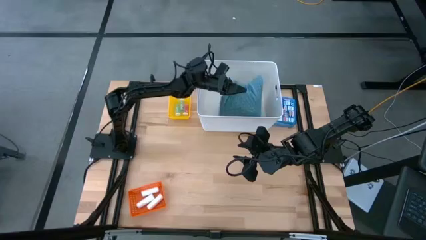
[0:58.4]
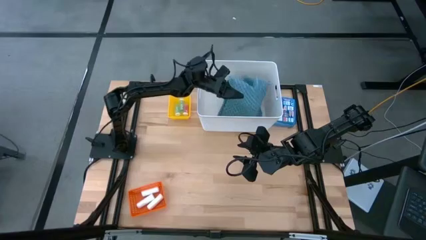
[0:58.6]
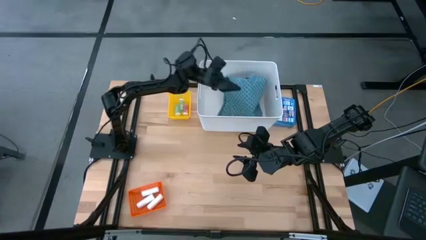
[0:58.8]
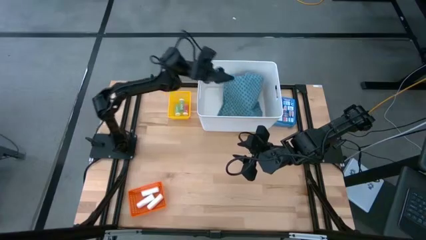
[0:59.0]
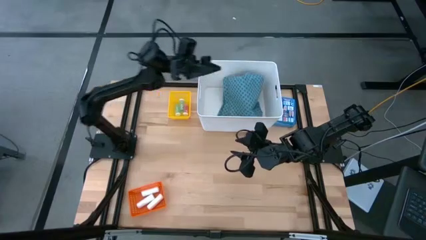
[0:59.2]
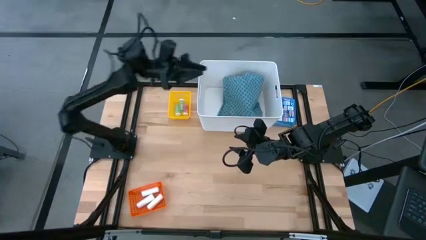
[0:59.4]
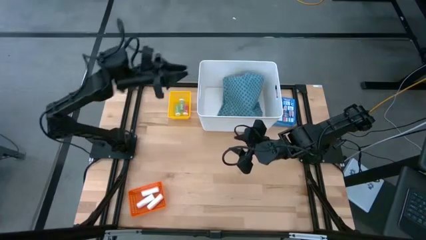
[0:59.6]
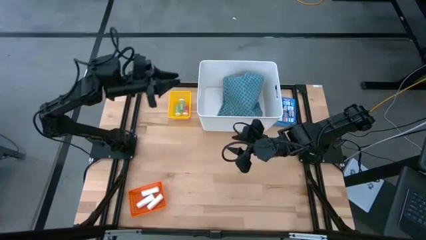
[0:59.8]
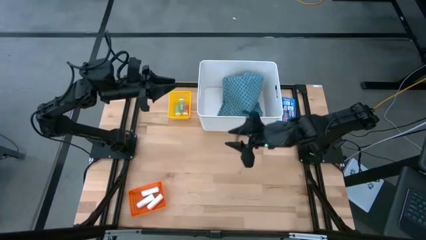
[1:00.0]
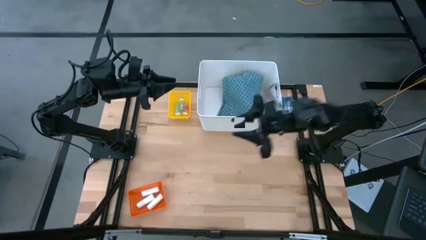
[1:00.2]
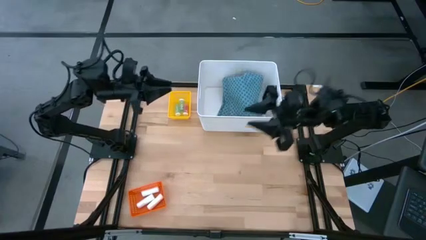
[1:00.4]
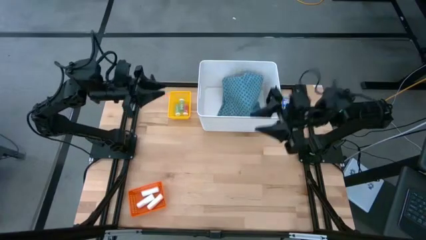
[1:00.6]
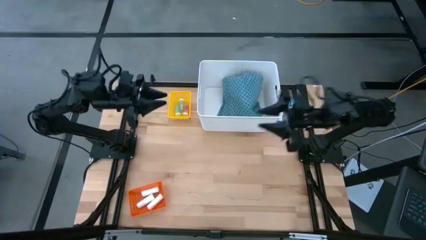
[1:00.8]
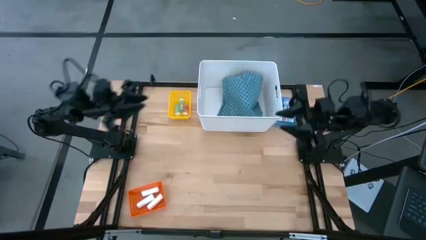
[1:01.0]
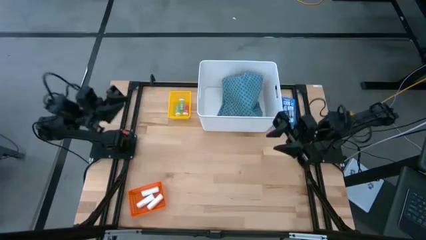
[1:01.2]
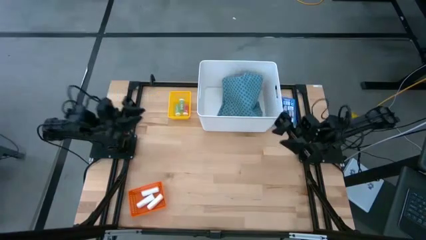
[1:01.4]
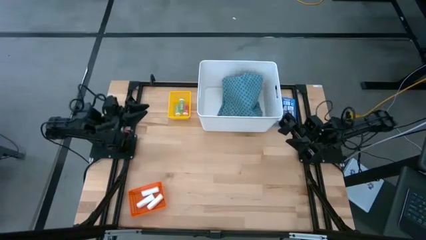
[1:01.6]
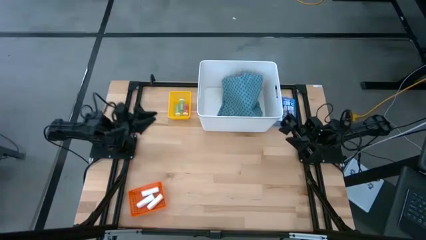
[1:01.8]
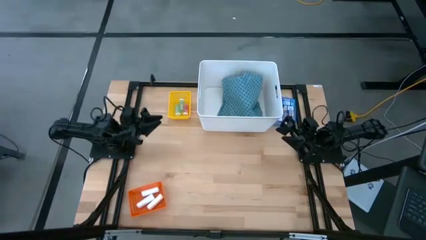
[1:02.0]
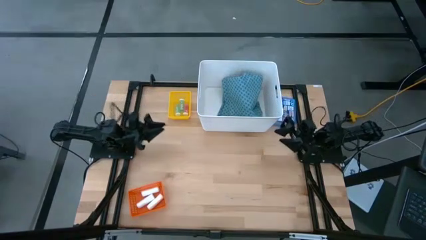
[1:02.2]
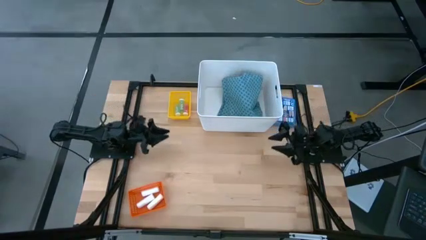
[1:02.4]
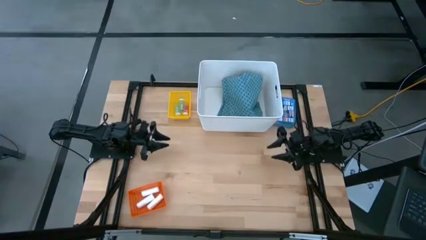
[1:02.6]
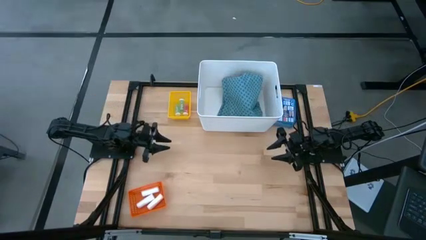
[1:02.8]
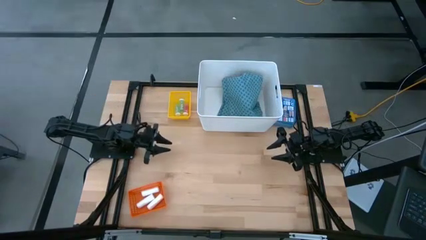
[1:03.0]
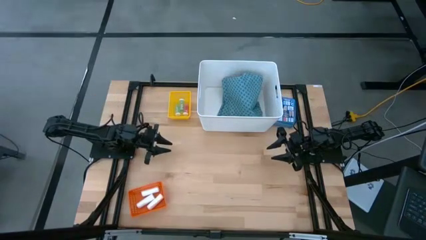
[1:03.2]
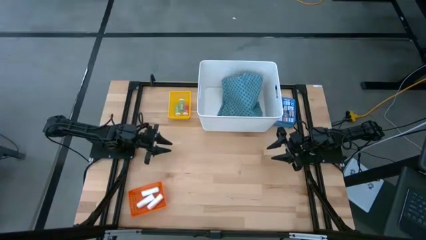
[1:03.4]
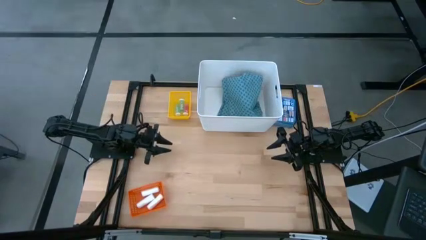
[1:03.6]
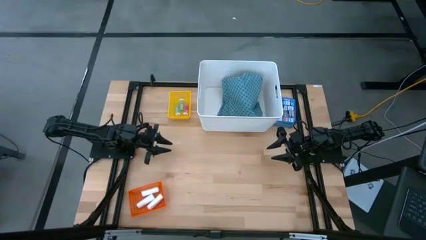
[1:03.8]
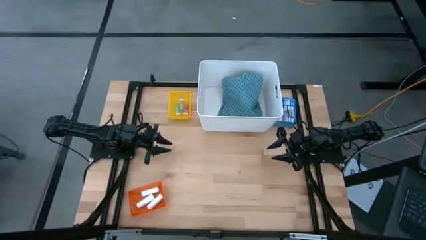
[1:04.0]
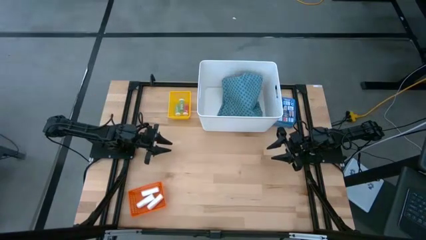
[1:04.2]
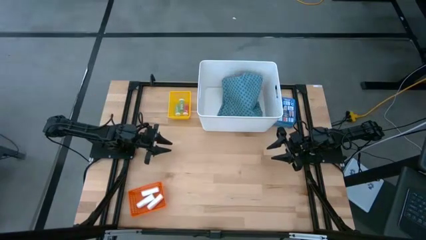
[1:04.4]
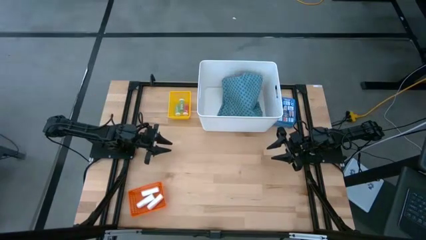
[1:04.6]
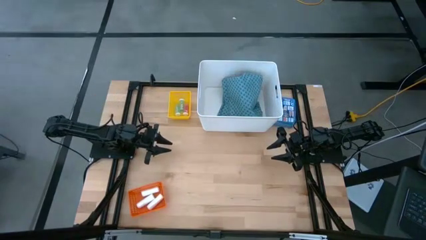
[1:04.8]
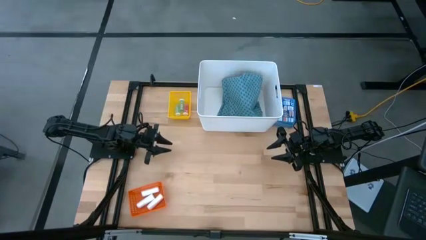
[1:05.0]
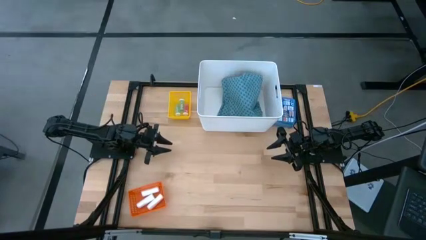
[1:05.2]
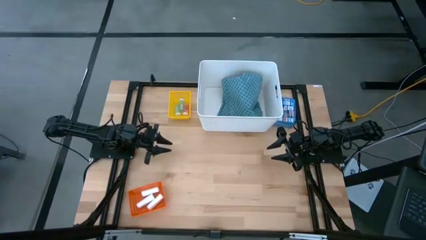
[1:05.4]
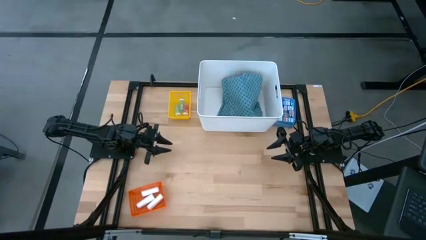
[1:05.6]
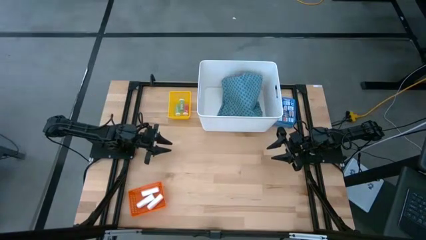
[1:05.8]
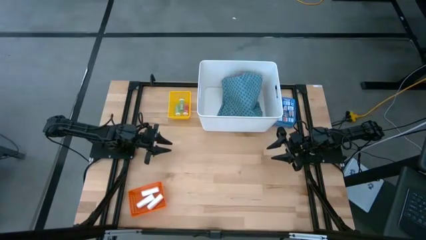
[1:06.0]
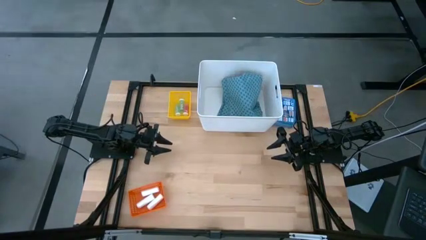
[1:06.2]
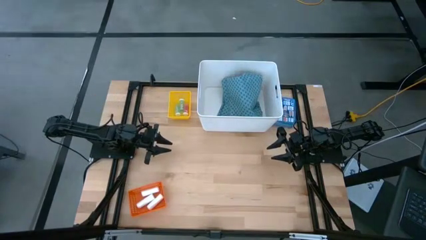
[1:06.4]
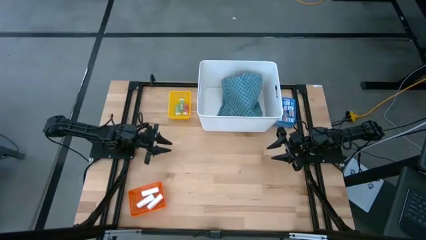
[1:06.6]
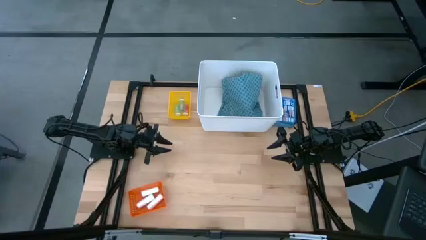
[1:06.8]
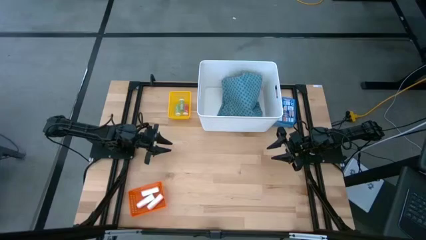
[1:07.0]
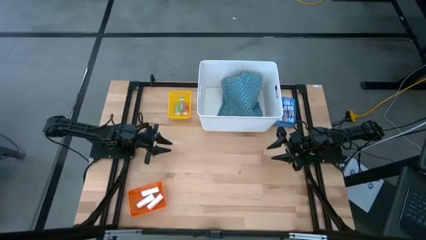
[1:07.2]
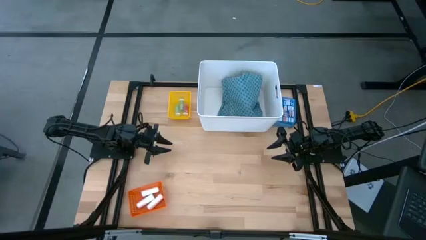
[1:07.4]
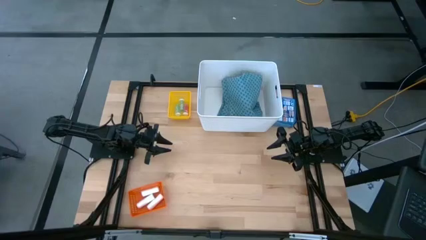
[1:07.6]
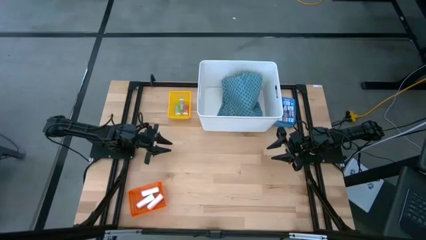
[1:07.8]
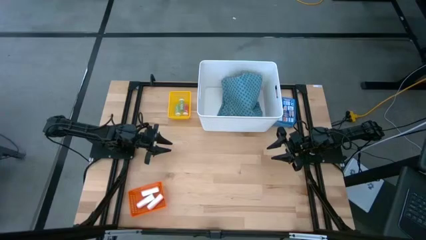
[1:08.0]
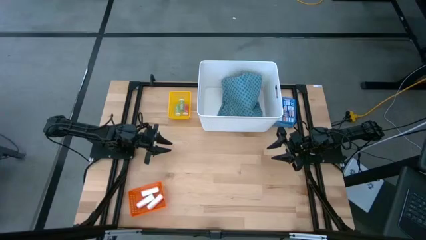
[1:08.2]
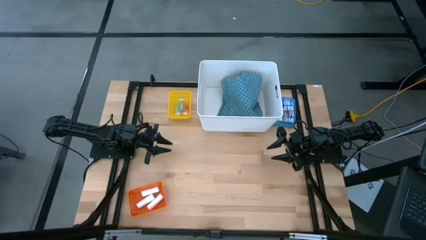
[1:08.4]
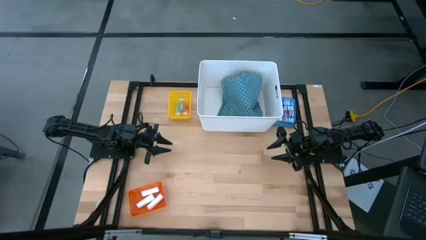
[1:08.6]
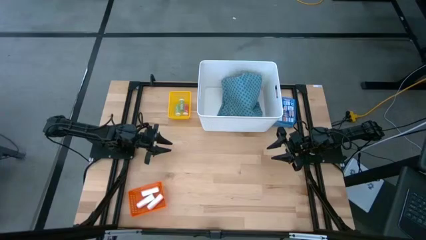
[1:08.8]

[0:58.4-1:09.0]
Task: Pick & place medical supplies in basket/bin
Return to Home Position

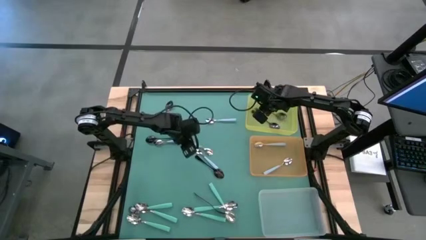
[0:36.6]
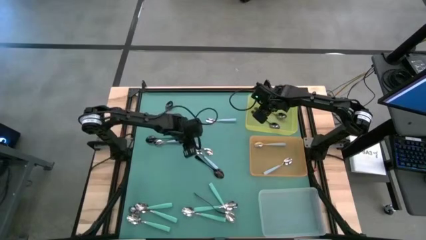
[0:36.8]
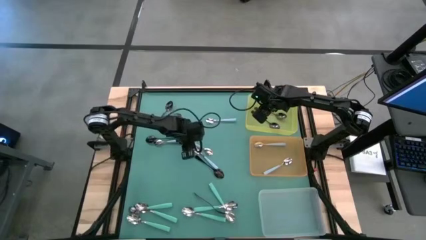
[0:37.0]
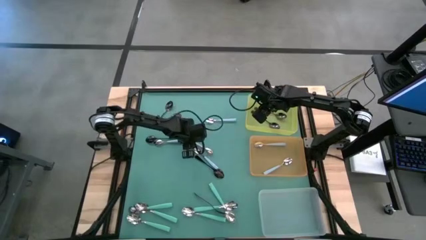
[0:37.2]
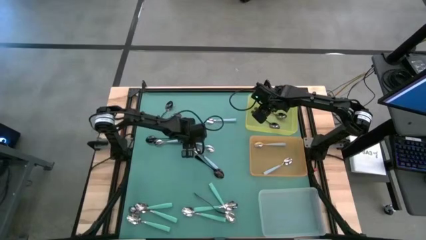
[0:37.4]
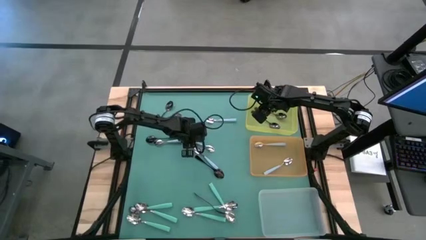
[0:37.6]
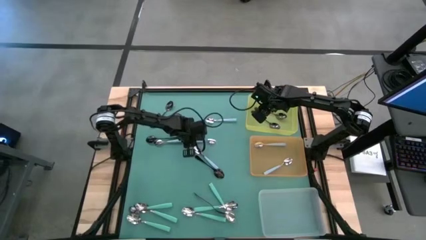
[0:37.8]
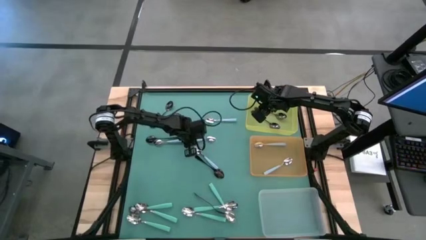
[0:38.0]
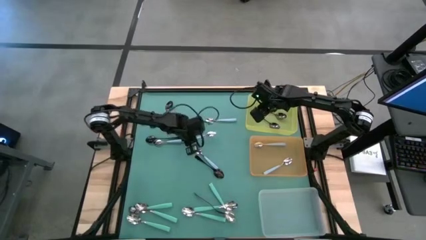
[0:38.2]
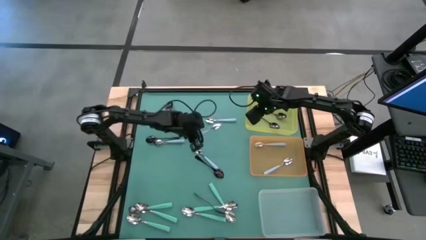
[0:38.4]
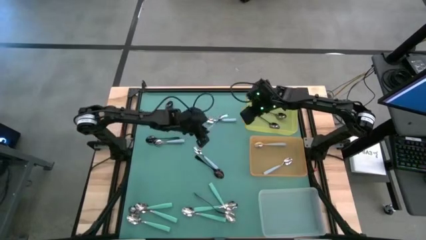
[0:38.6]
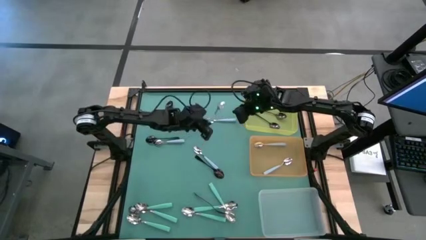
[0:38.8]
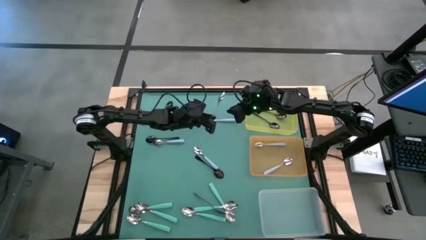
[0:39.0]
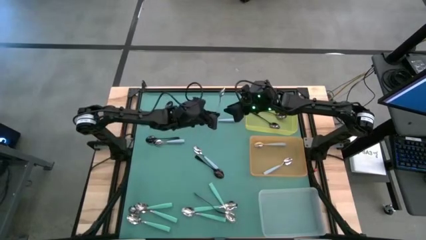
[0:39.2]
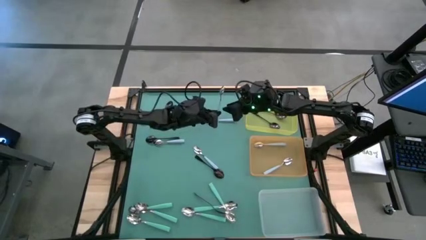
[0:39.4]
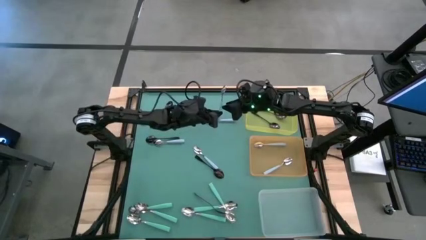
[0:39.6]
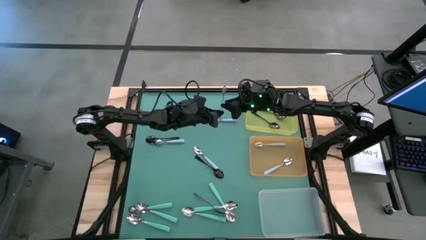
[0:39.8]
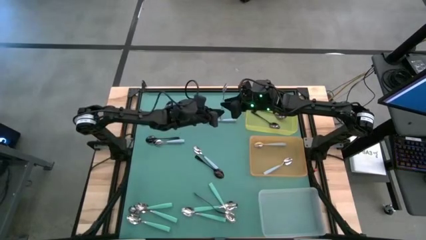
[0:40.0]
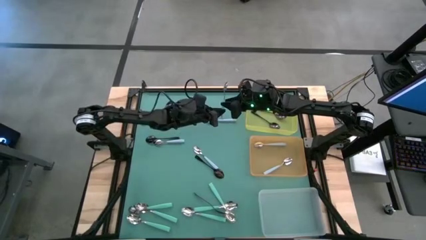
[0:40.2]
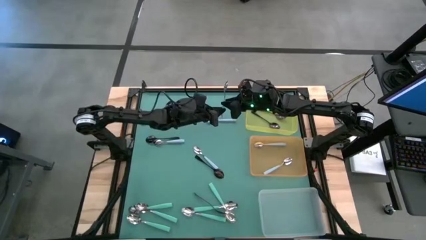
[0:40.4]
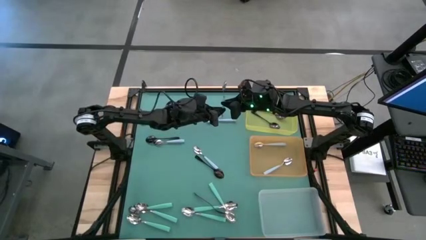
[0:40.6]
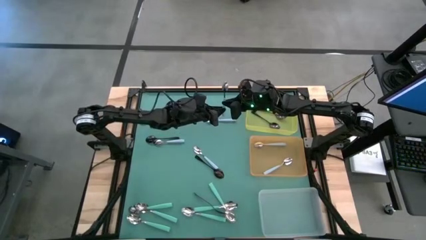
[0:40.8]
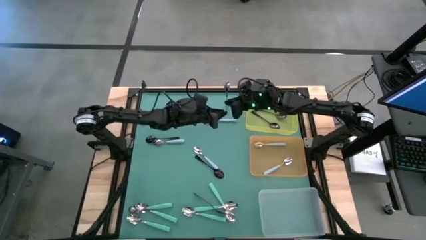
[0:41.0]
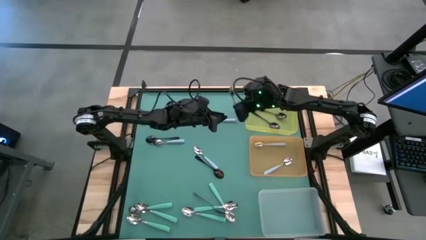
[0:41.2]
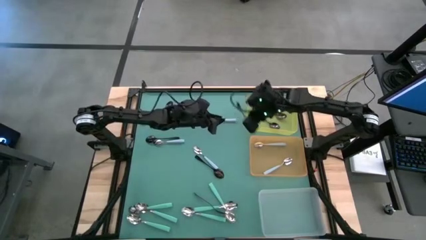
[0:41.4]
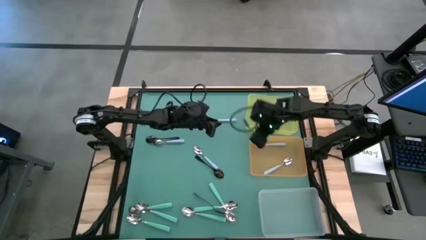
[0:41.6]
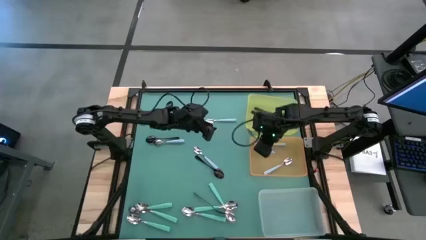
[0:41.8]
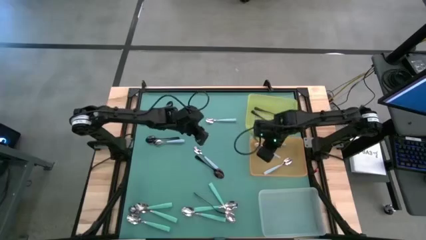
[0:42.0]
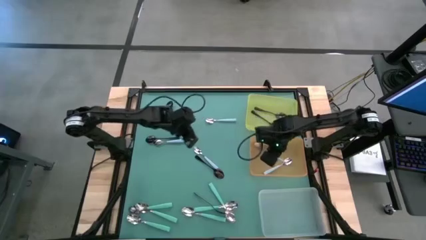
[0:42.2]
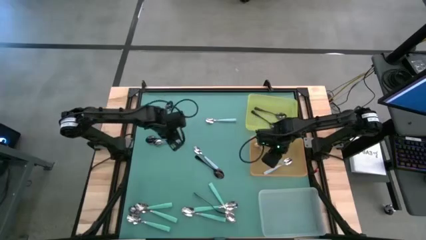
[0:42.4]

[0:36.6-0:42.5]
Task: Sort silverware by color (type)
Put the blue spoon into the orange bin
